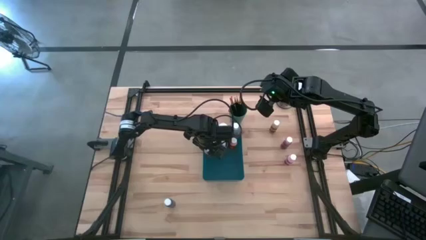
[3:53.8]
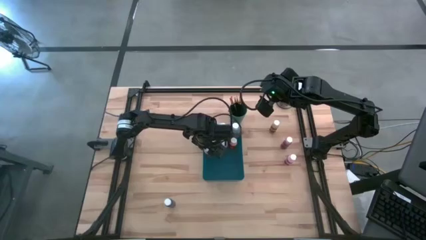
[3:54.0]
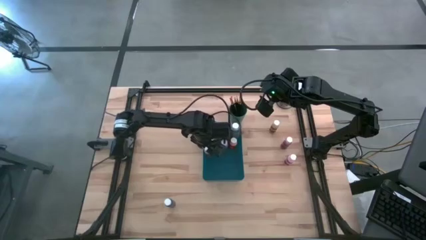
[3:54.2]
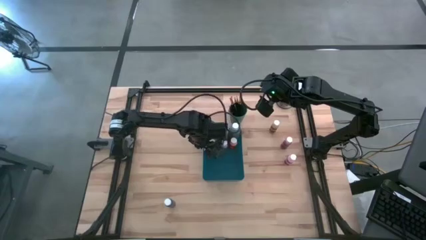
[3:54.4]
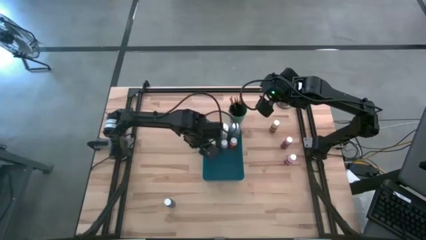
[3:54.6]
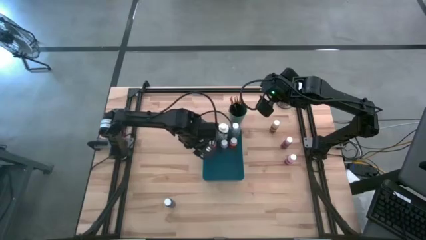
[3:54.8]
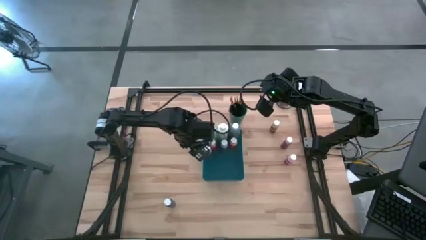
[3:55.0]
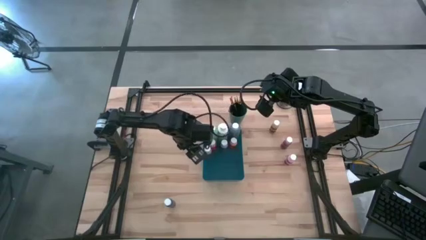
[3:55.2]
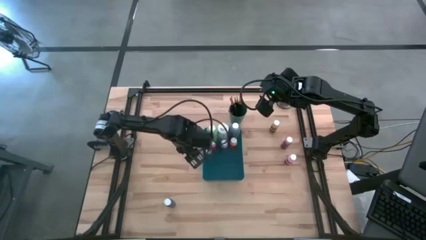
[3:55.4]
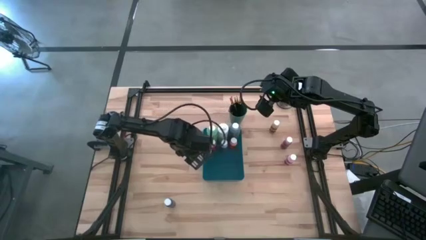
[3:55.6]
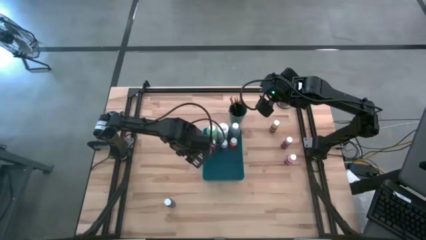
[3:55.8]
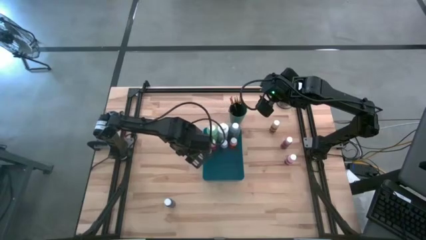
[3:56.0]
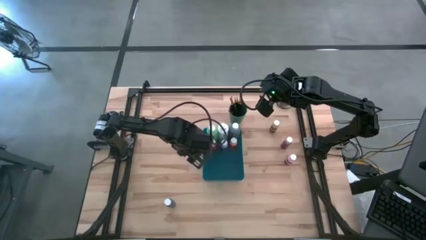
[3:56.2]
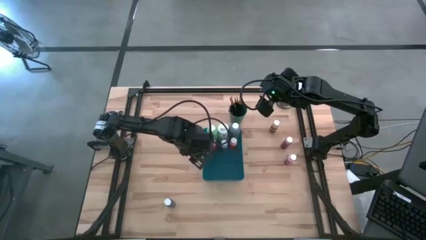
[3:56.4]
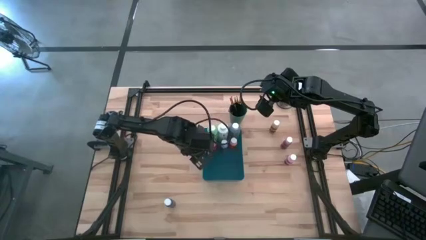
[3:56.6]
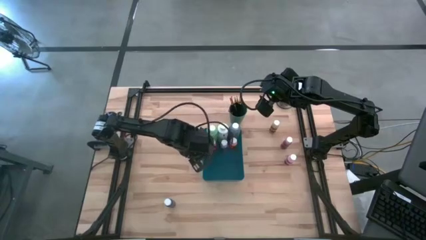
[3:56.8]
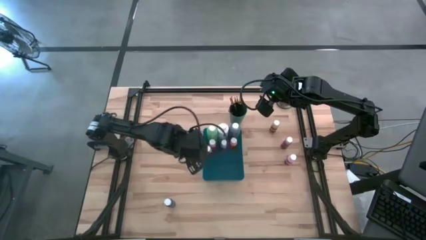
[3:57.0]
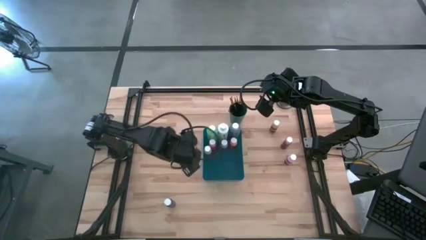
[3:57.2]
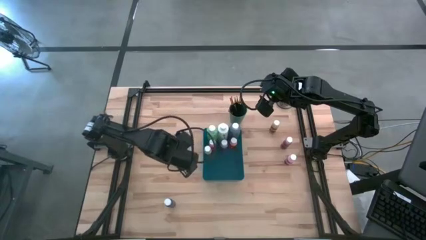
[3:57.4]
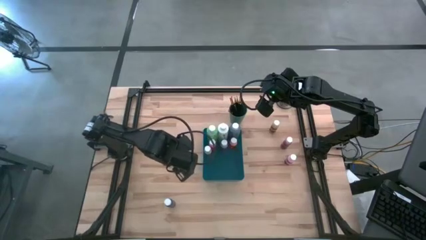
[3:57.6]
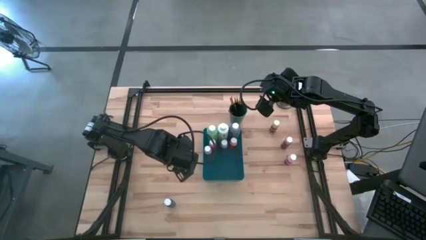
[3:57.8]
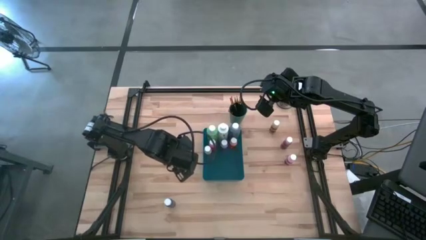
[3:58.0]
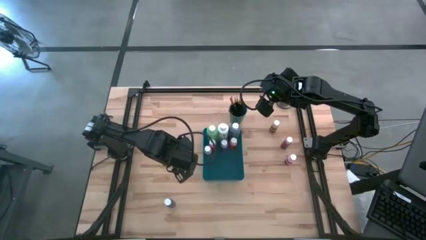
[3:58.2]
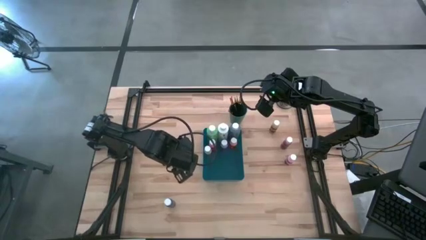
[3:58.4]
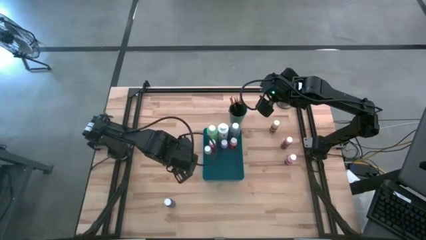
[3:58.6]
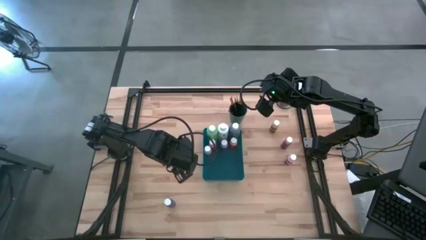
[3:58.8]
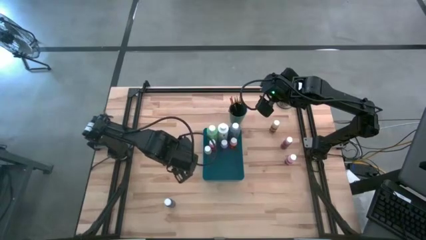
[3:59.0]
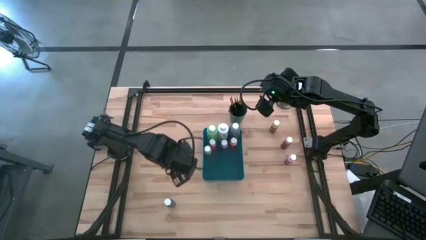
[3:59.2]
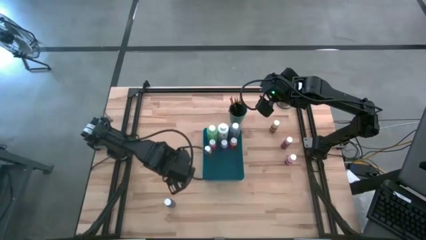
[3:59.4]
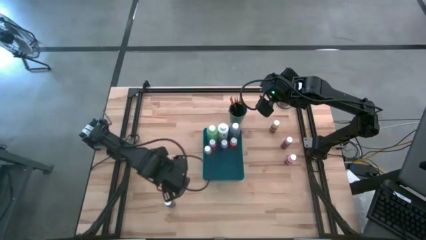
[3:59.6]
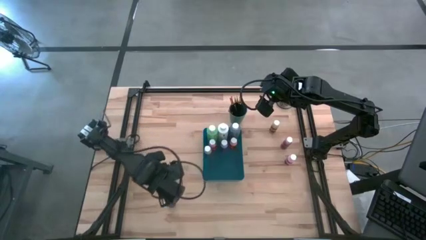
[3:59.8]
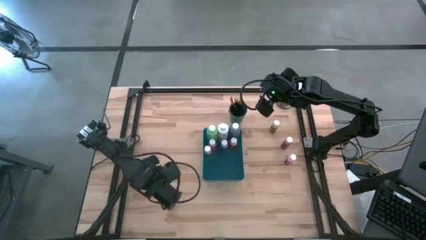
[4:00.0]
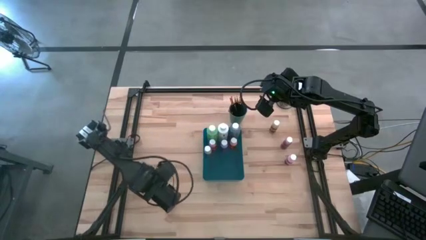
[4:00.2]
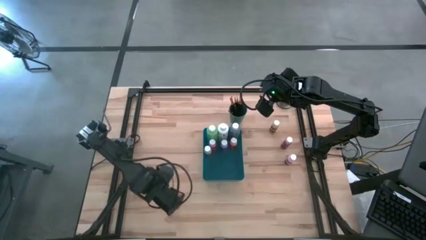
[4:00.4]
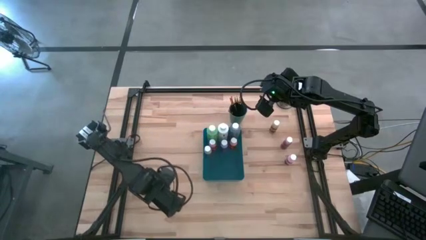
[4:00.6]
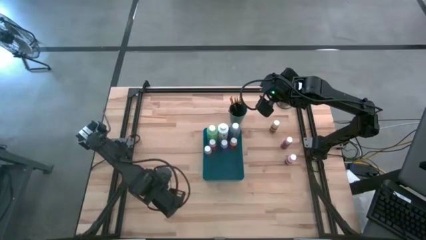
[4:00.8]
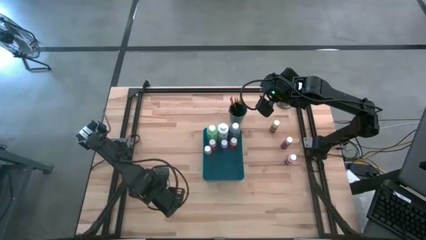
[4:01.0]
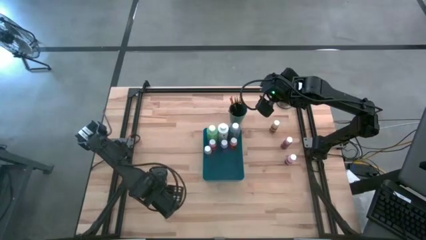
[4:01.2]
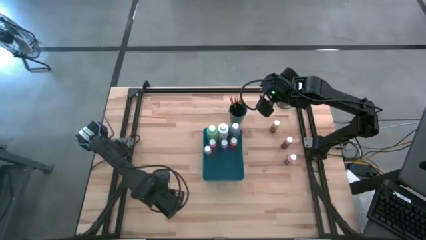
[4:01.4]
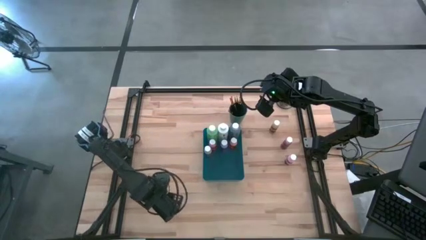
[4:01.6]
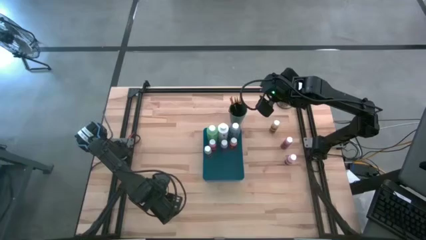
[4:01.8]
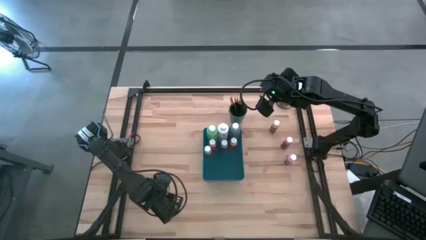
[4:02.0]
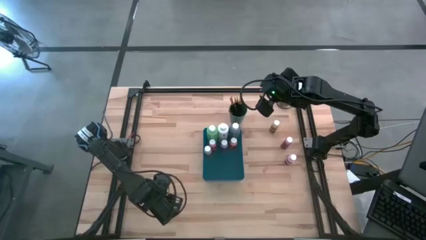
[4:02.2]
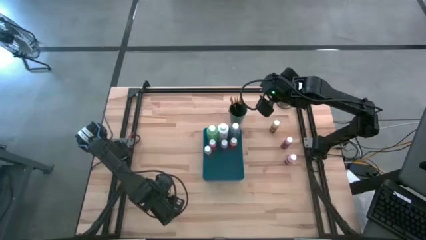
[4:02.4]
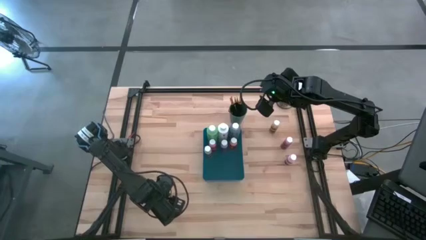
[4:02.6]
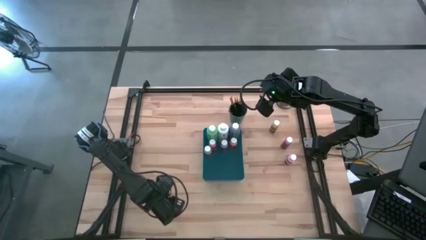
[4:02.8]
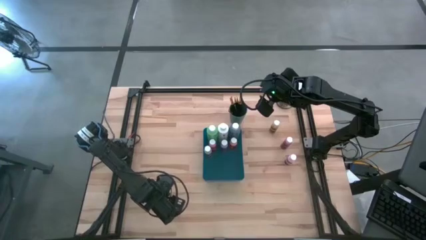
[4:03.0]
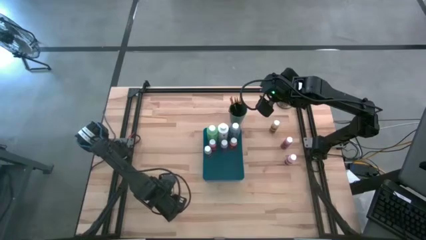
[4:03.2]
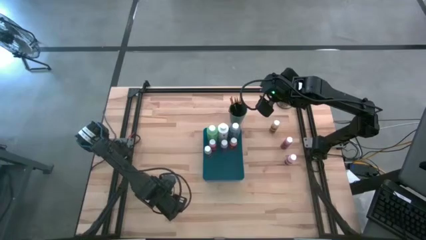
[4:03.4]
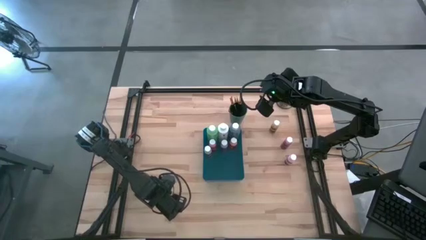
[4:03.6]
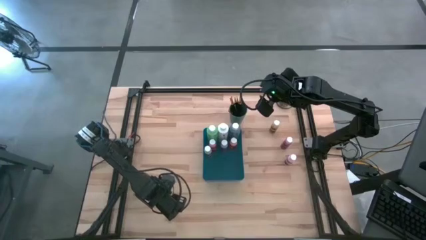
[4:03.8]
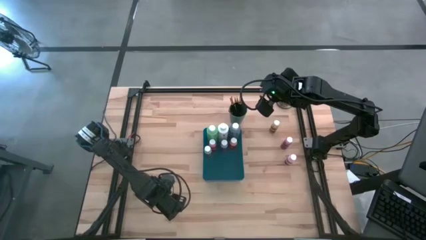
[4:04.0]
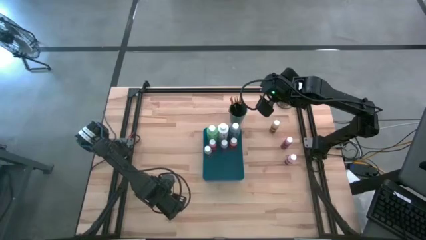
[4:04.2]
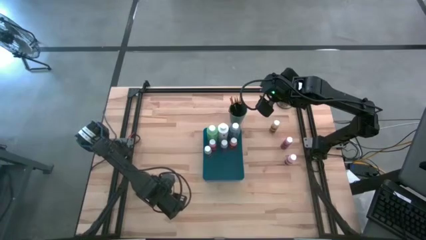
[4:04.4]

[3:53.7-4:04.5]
Task: Pick & Place Paint Supplies
Put the small blue paint bottle into the blue bin

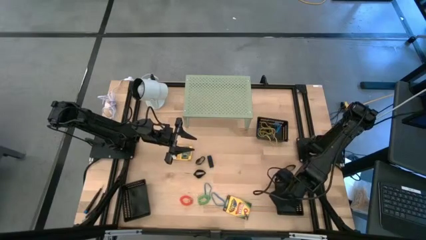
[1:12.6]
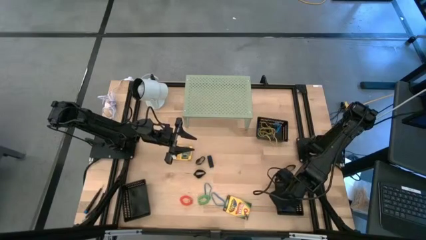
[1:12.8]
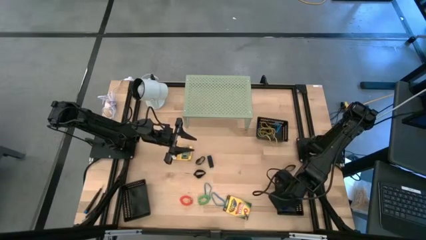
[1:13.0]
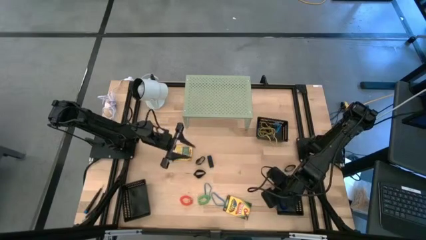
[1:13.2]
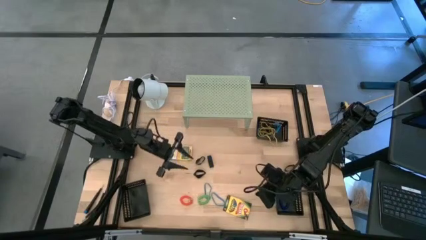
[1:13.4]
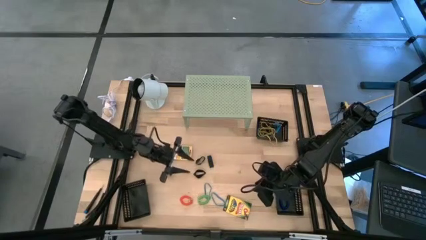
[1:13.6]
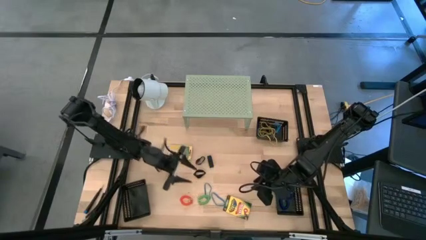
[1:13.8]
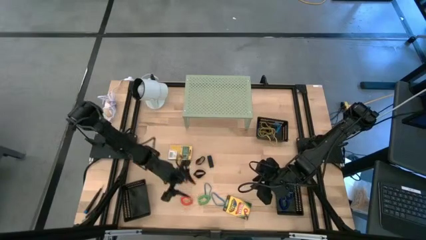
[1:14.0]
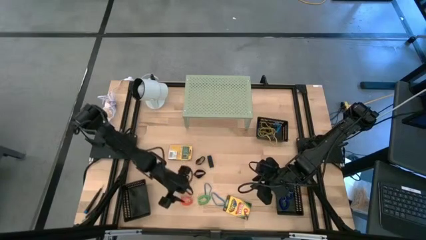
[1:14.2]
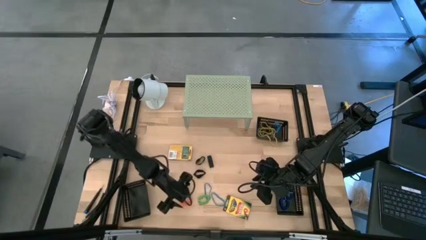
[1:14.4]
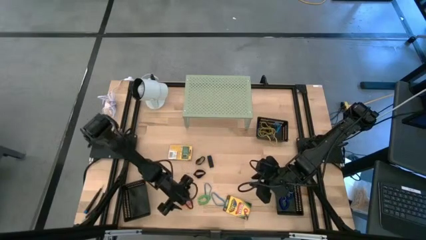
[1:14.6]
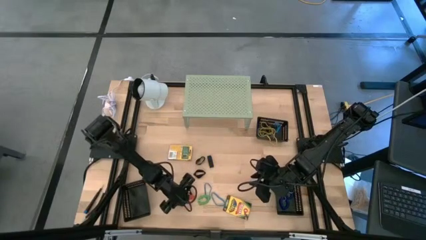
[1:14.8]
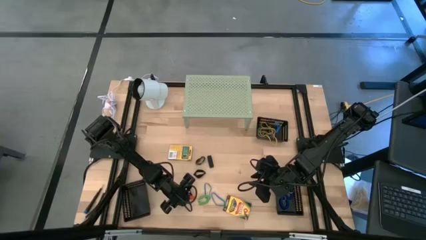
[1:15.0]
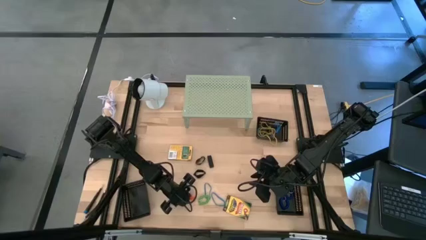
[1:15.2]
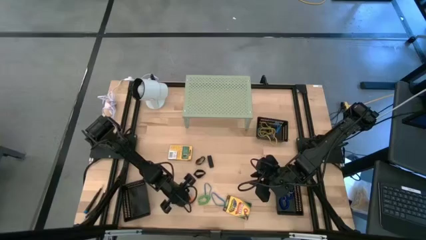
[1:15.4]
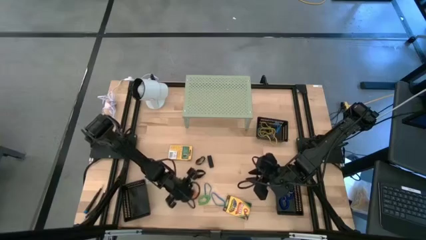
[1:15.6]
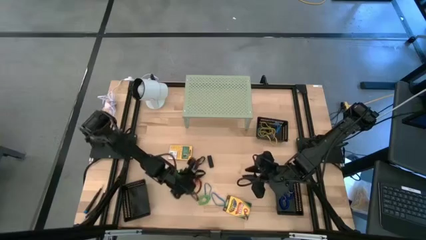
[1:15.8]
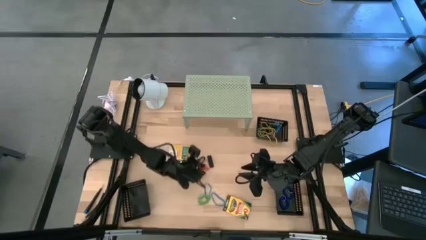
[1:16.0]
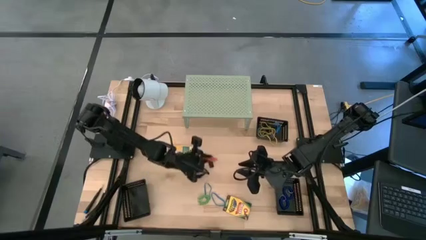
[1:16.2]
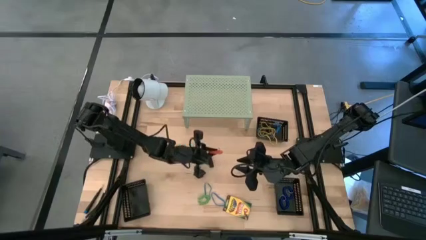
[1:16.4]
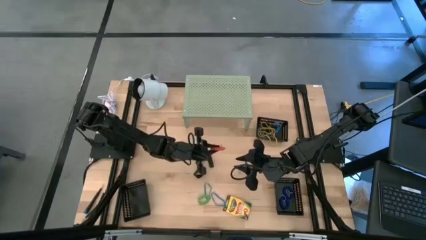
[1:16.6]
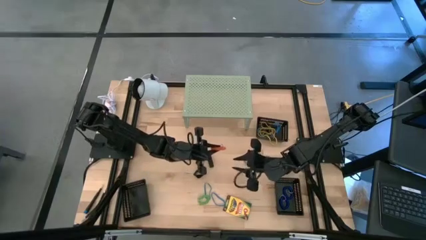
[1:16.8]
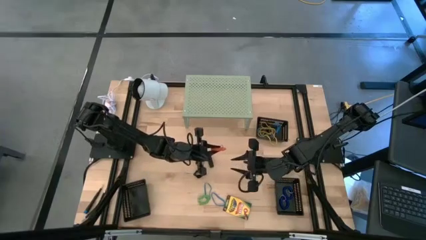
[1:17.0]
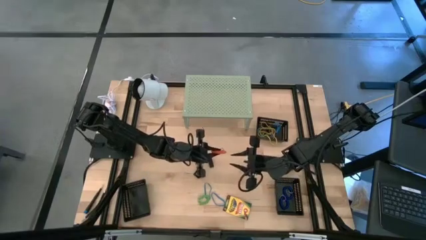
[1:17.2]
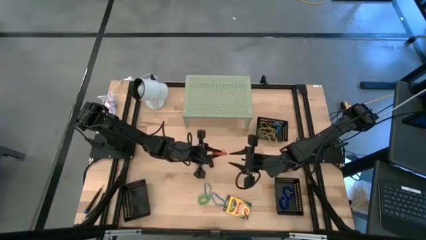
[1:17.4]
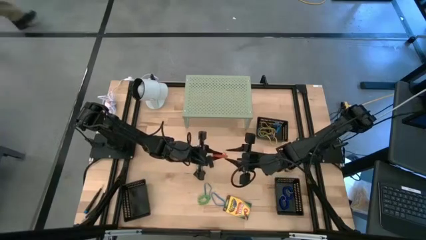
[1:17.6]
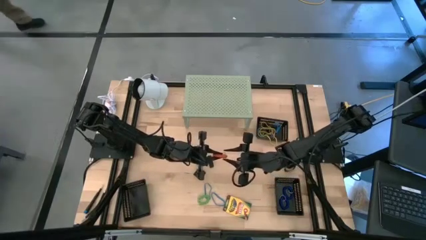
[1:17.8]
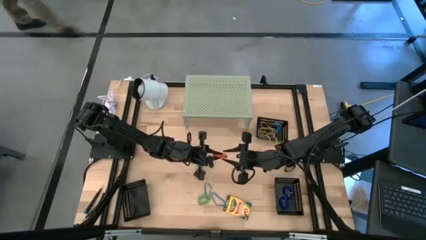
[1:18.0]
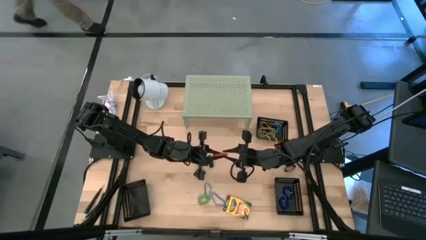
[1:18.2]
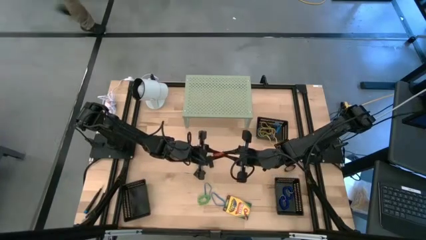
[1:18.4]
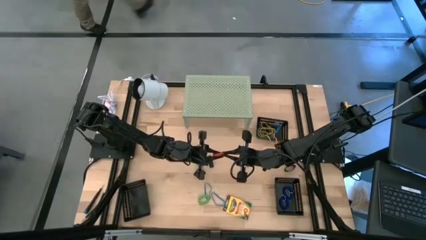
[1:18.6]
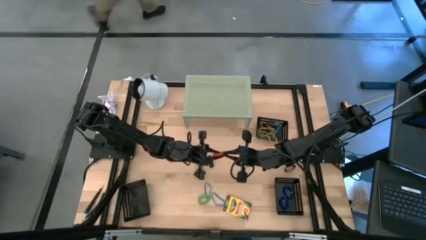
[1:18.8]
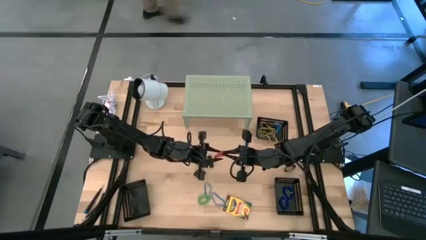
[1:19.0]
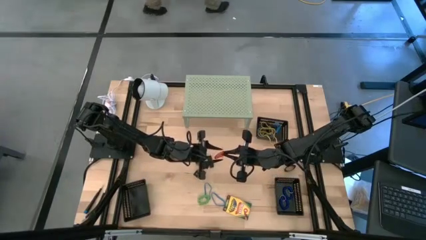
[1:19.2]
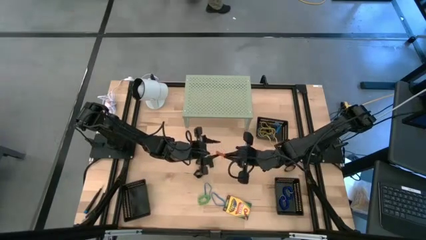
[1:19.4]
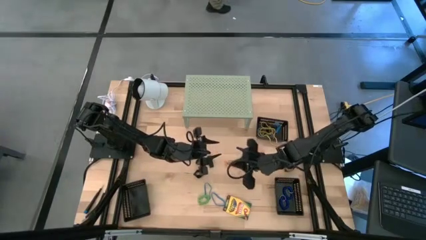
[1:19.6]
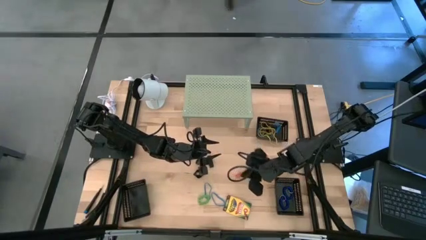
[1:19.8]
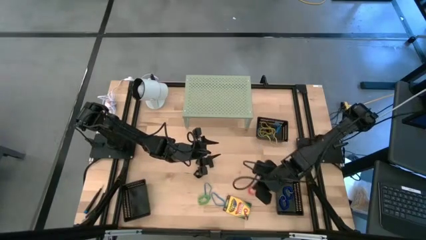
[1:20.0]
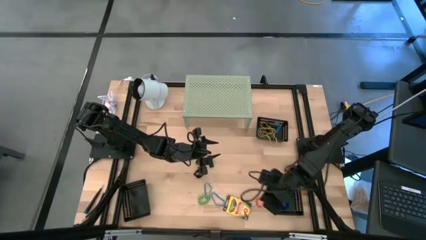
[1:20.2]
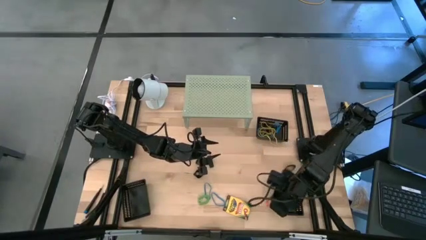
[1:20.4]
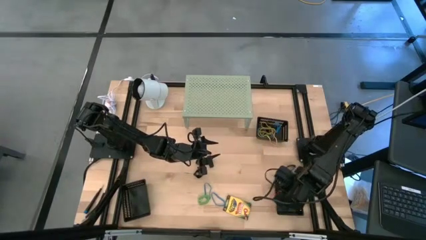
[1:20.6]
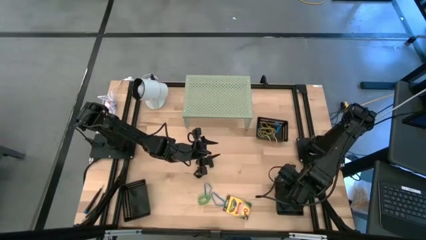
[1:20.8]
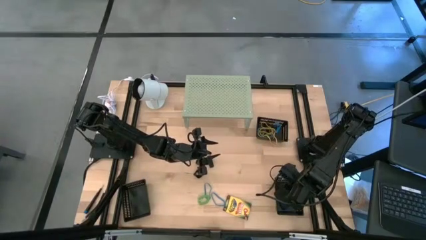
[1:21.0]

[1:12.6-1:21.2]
Task: Pick & Place Office Desk Supplies
Put the orange spring keychain into the bottom right black bin
